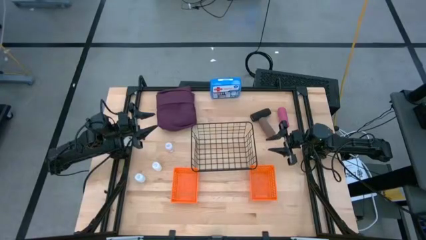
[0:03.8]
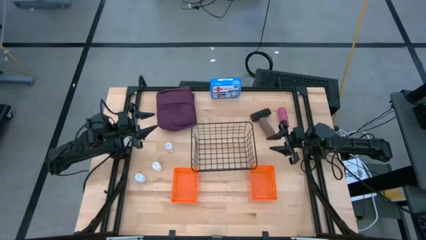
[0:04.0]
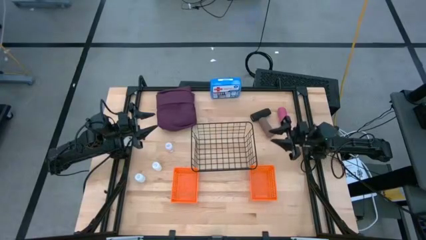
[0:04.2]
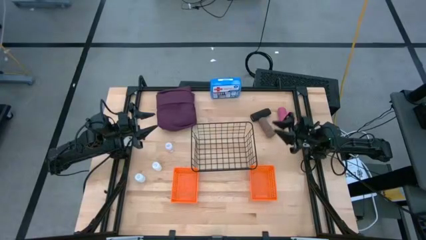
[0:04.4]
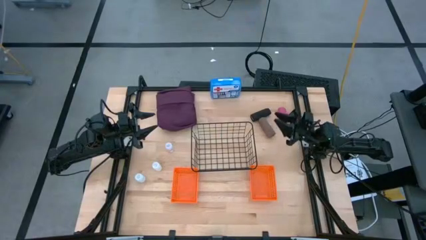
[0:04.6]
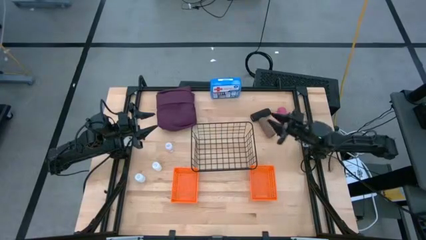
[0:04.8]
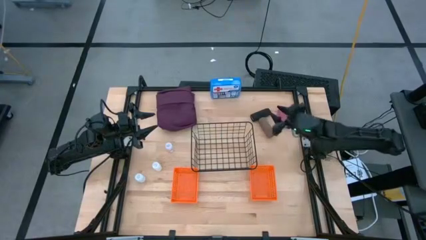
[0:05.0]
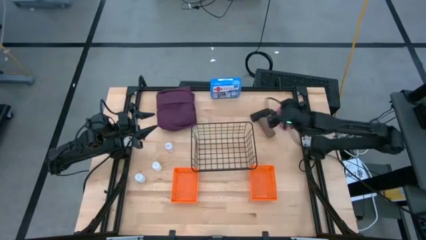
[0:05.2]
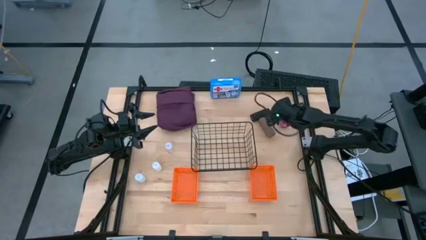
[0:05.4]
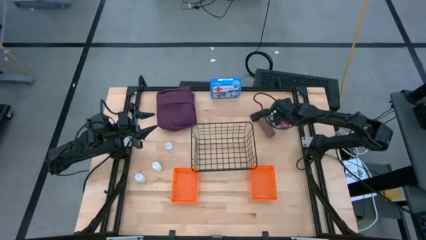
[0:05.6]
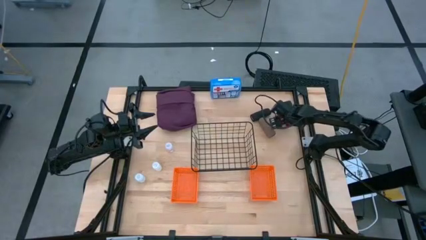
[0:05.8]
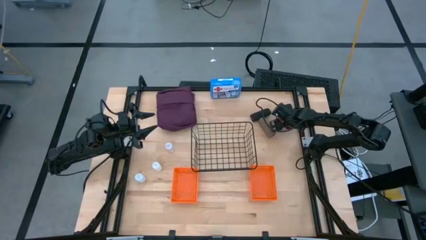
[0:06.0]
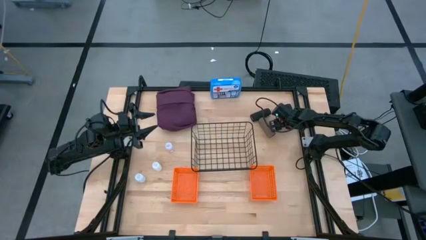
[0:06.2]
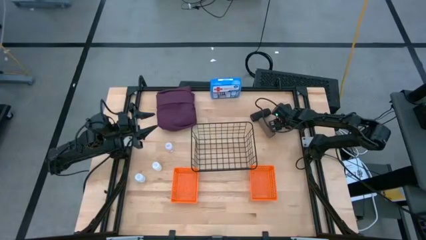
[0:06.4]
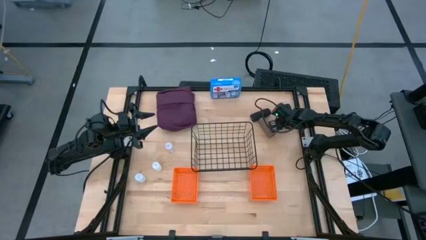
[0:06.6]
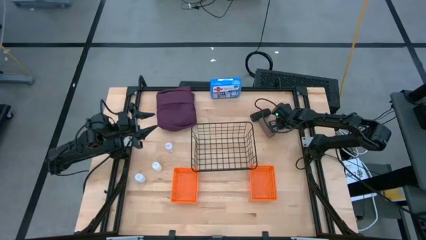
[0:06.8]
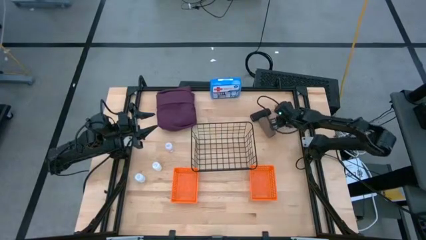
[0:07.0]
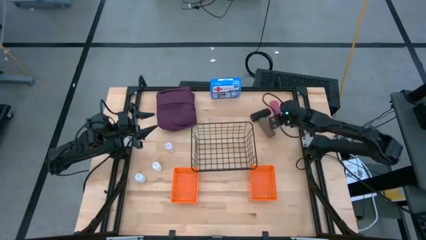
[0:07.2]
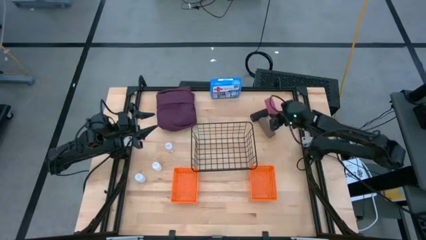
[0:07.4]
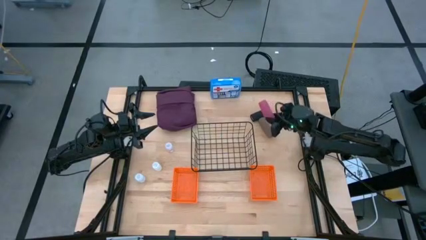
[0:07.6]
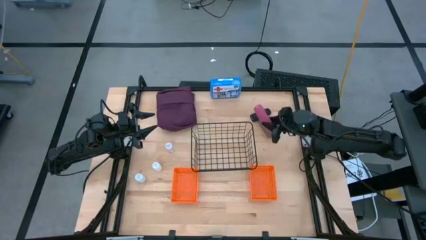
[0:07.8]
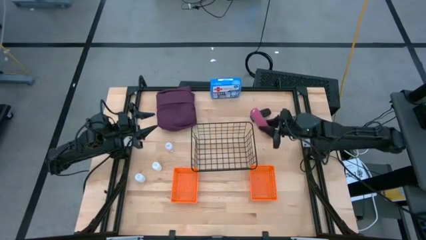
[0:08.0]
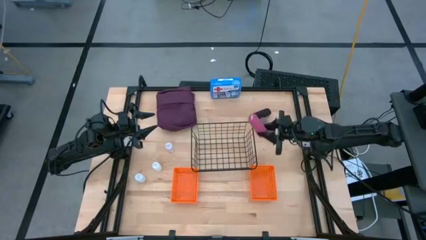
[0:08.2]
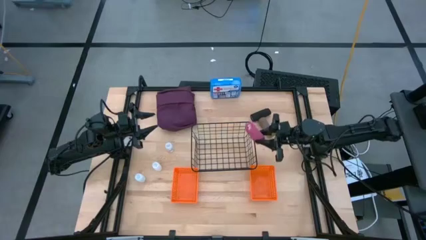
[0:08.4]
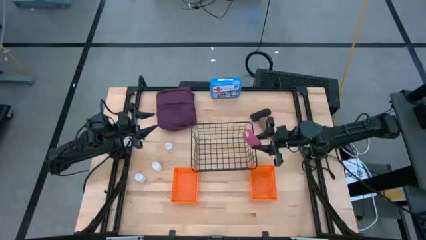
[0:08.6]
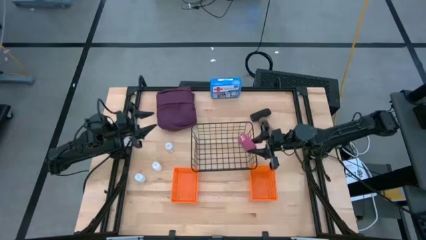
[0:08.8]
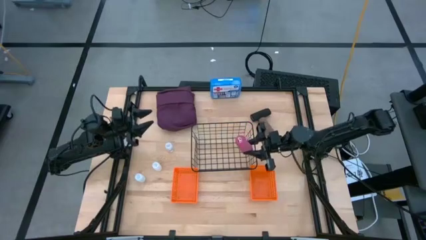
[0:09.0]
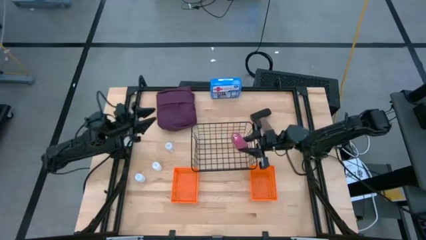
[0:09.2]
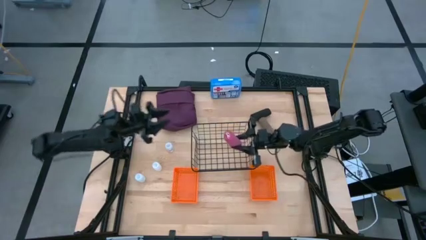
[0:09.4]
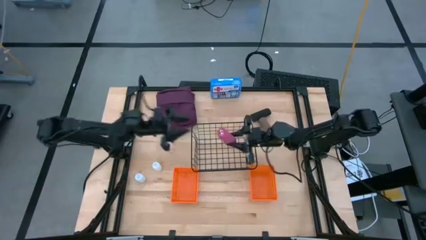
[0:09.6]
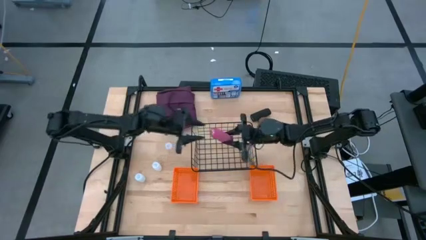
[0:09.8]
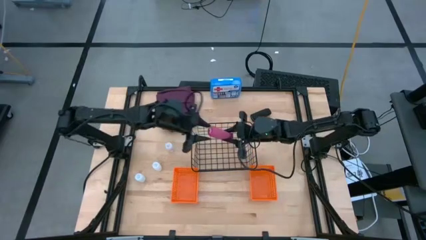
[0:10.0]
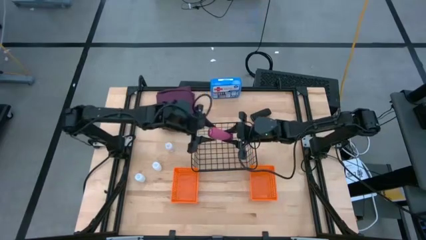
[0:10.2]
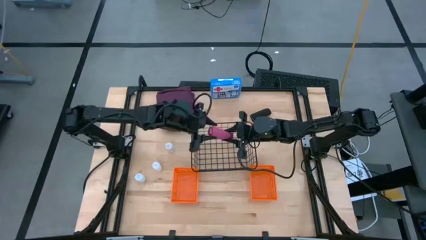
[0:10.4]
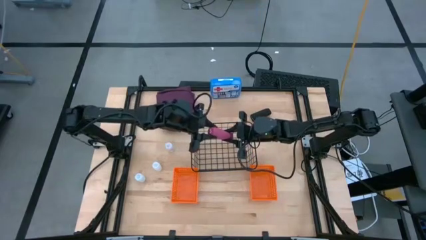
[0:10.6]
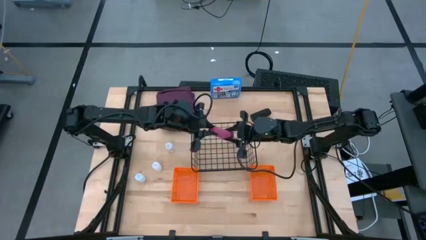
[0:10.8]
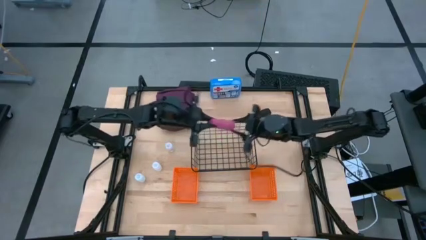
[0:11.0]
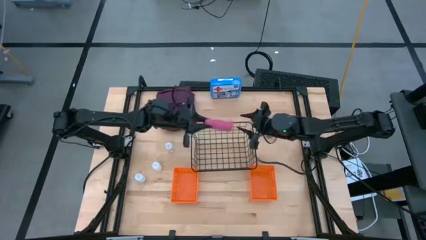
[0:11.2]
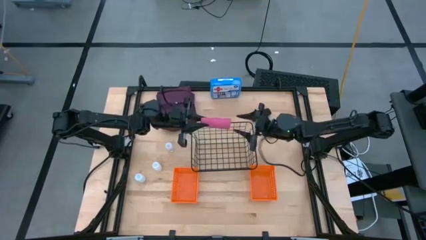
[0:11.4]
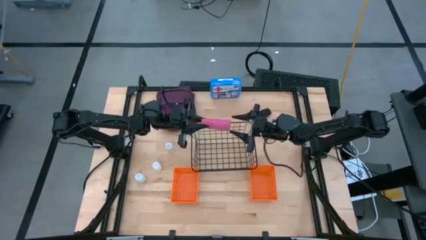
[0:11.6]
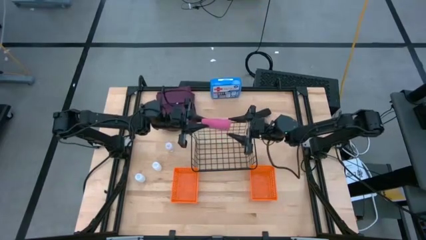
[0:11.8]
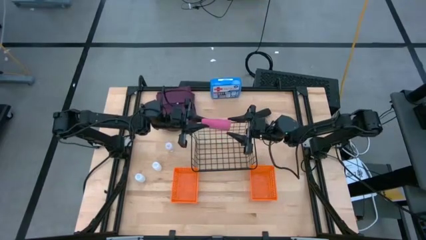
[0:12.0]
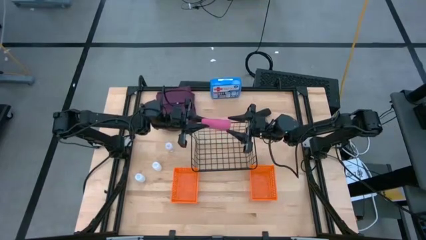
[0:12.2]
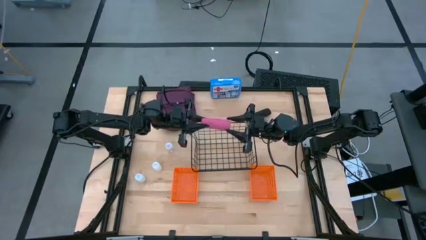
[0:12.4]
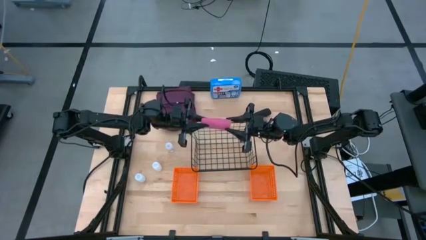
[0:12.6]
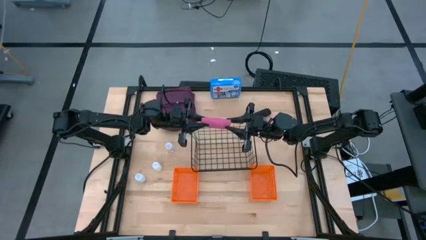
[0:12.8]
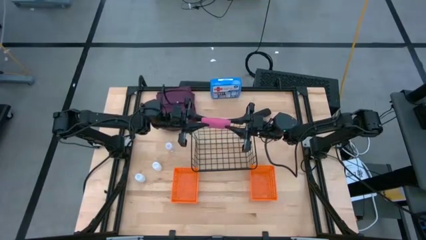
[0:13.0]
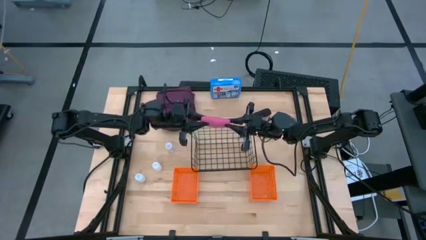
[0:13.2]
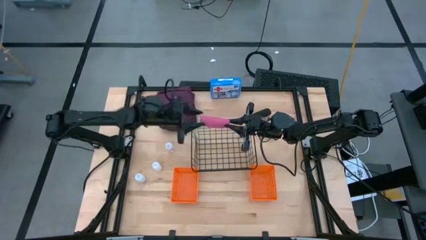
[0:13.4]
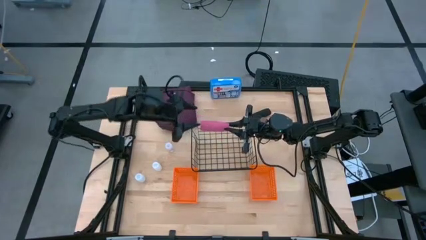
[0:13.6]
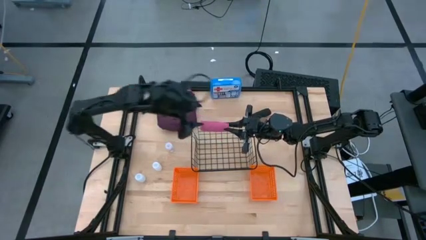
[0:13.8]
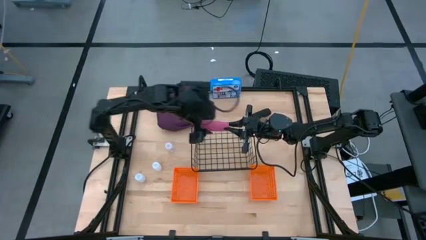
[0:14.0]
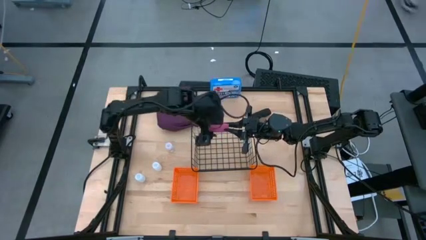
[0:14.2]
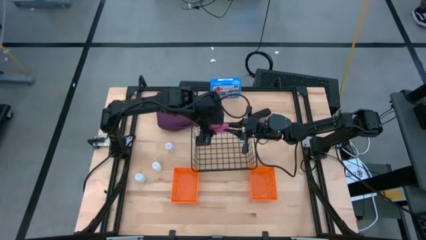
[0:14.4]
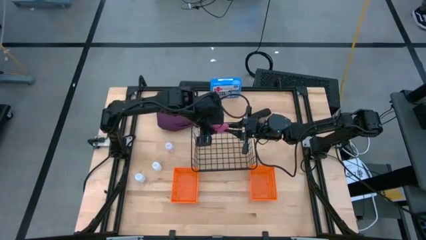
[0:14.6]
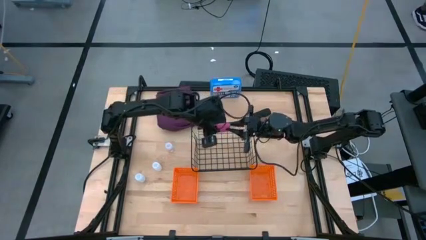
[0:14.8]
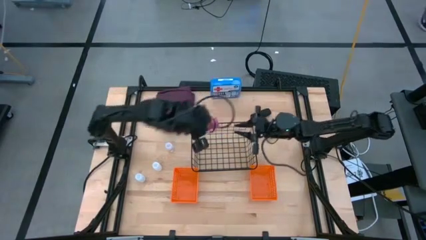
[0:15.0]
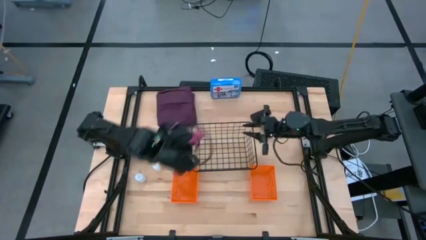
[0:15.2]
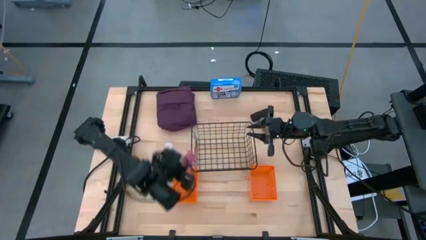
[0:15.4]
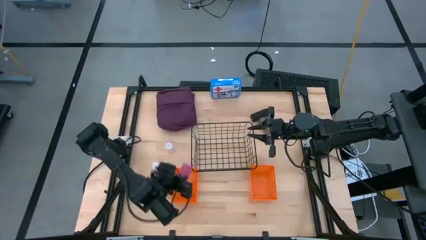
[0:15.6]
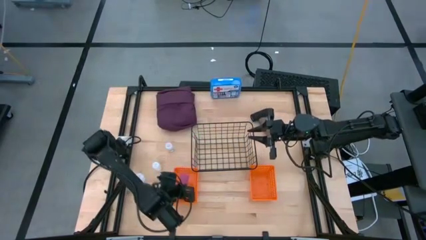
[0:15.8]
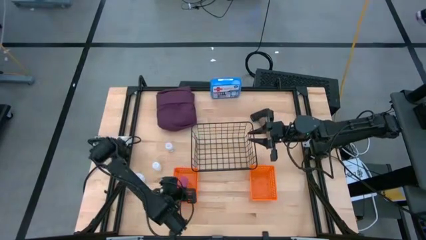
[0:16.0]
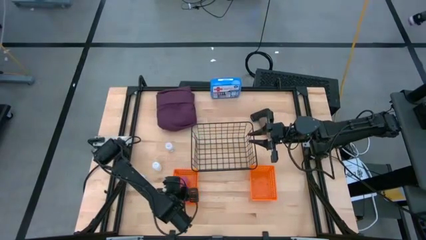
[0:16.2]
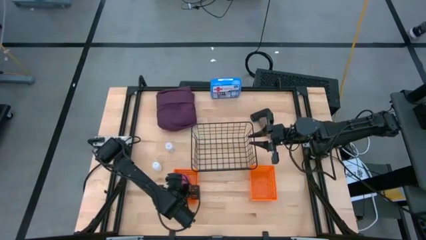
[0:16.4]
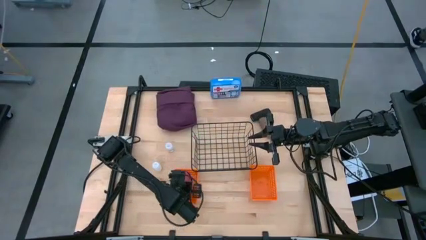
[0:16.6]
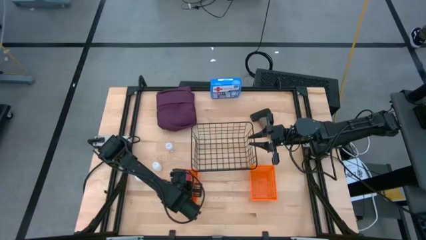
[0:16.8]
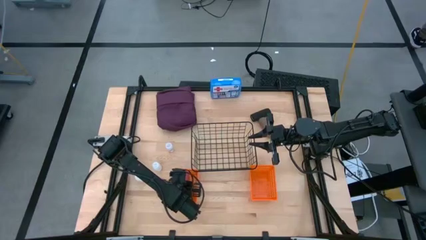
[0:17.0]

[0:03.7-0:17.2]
Task: Pick & Place Medicine items
Put the pink bandage into the left orange basket
